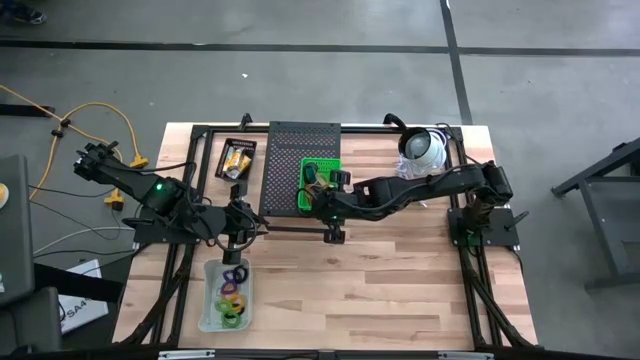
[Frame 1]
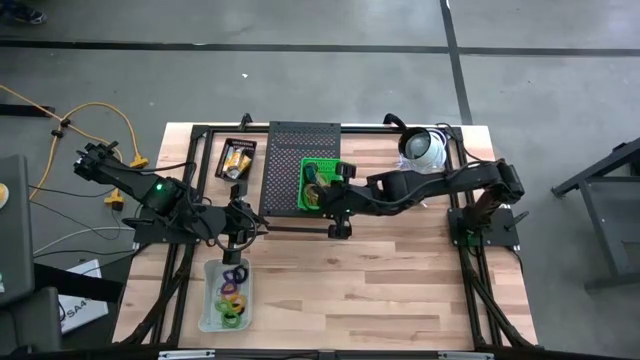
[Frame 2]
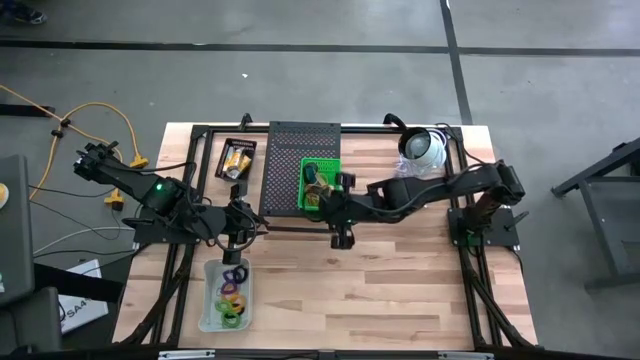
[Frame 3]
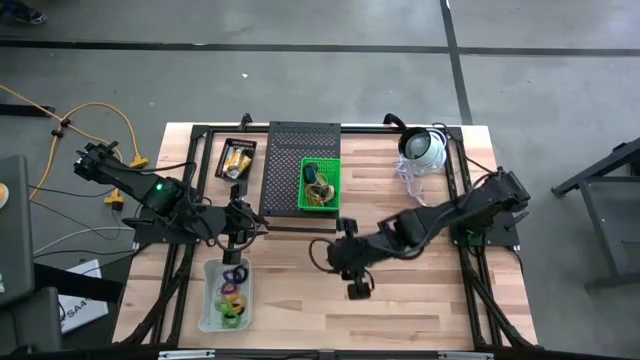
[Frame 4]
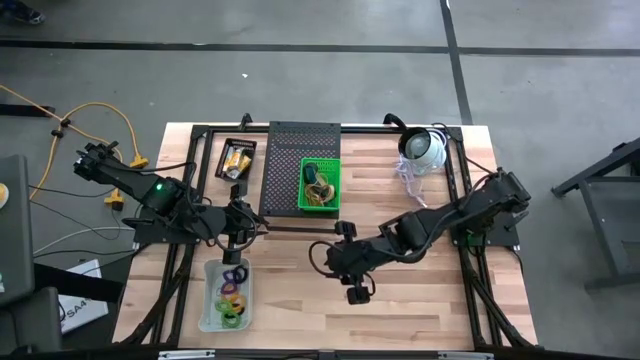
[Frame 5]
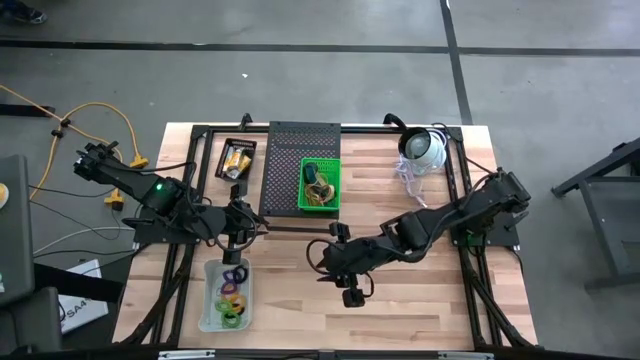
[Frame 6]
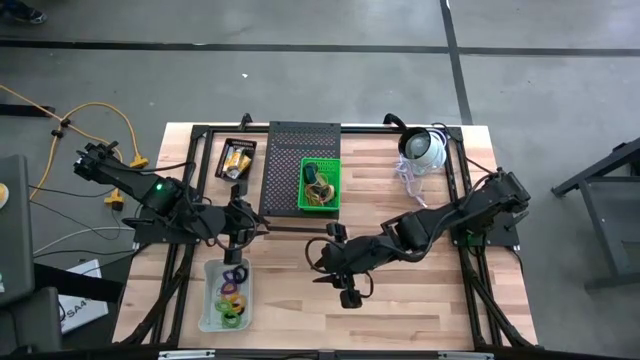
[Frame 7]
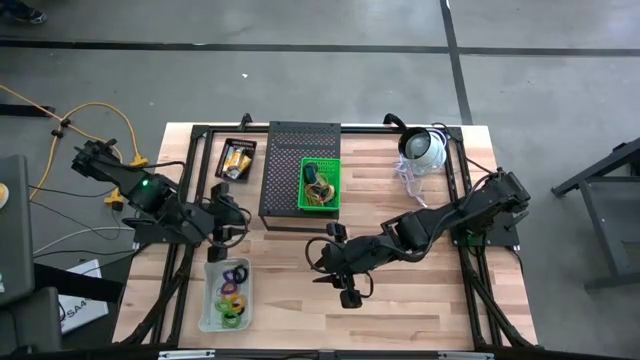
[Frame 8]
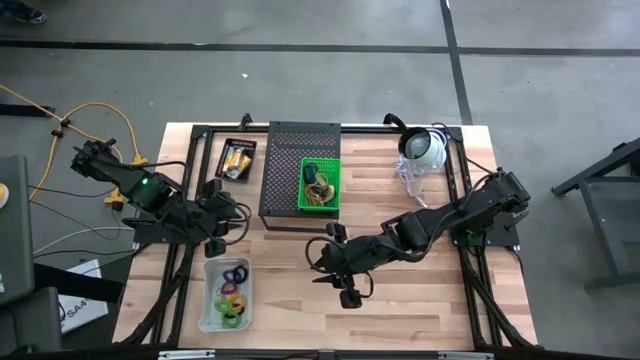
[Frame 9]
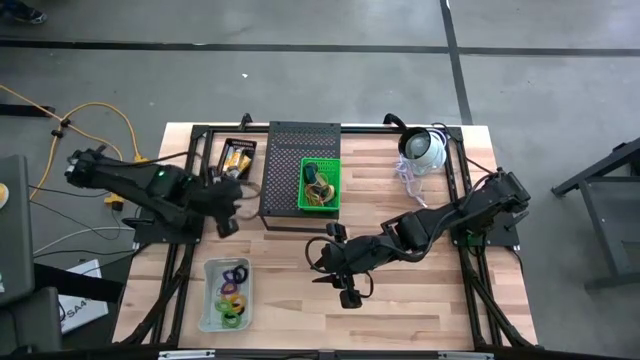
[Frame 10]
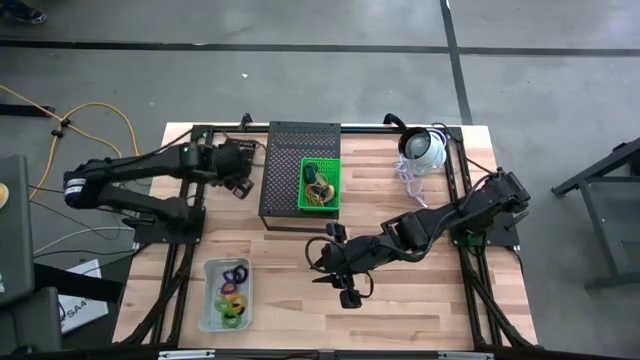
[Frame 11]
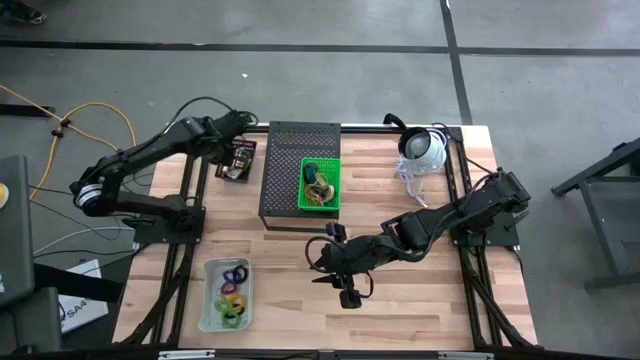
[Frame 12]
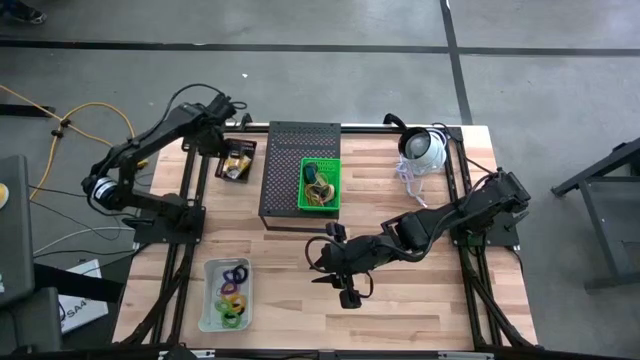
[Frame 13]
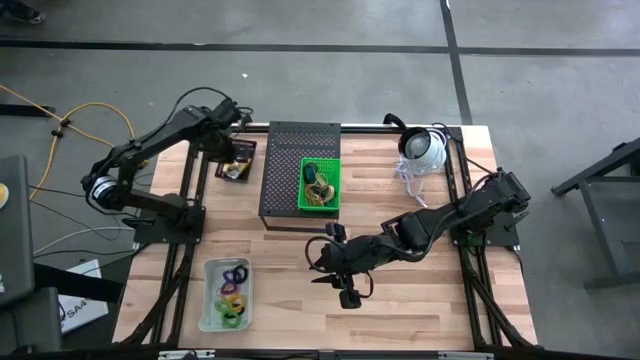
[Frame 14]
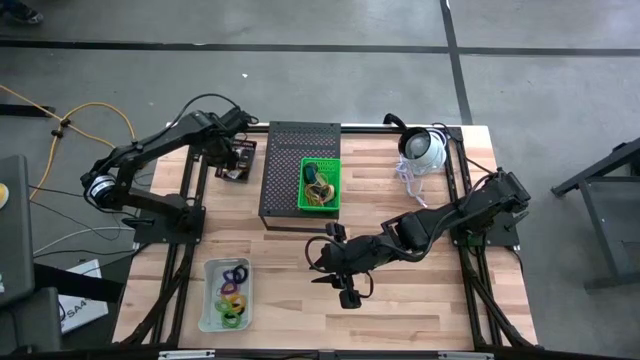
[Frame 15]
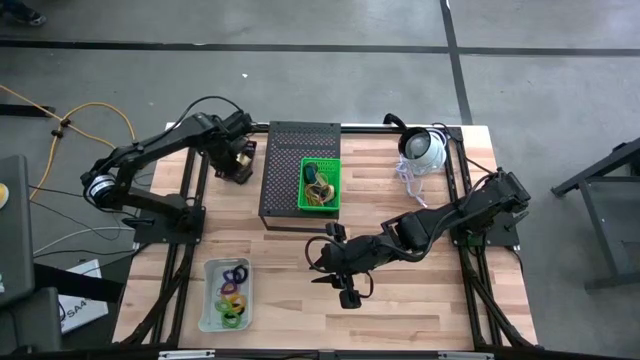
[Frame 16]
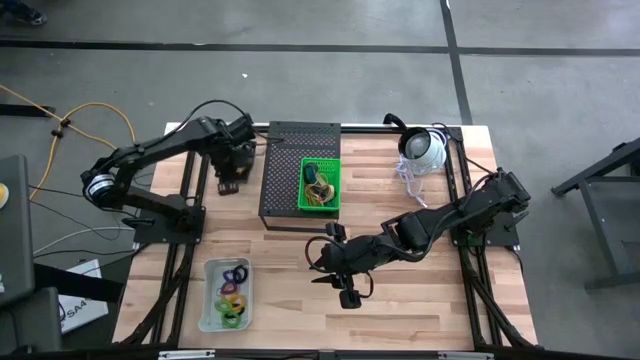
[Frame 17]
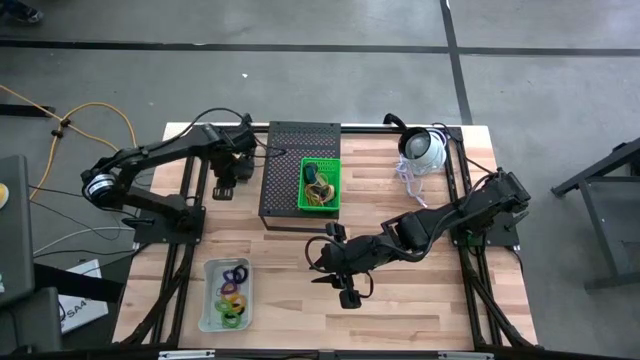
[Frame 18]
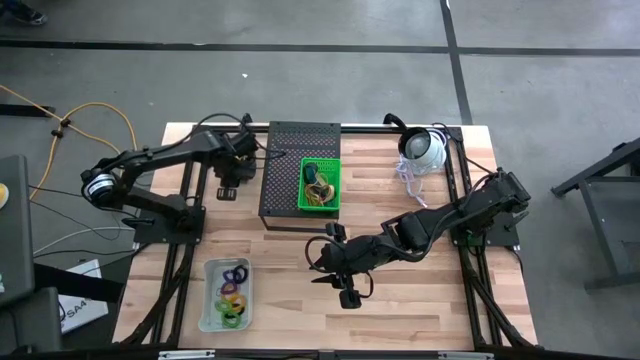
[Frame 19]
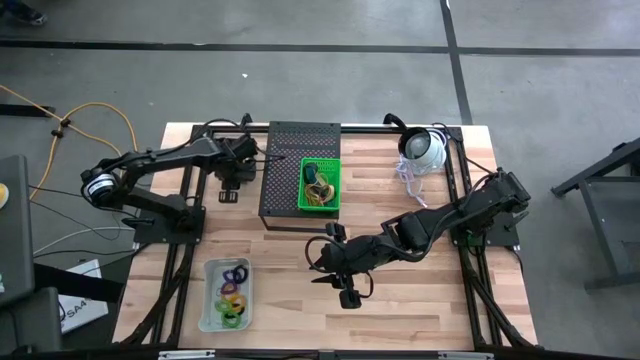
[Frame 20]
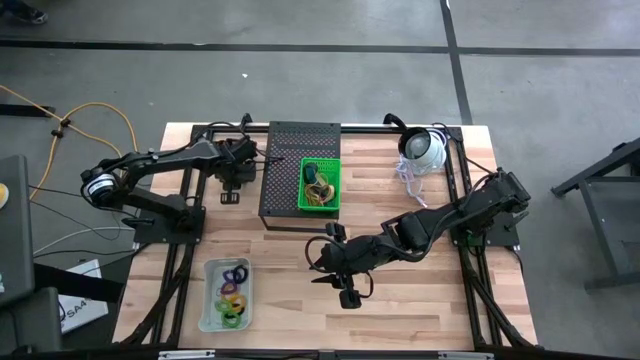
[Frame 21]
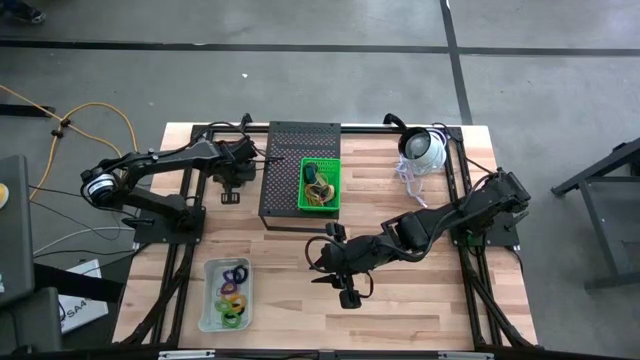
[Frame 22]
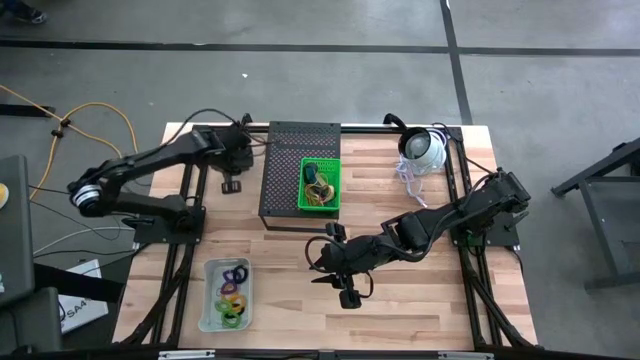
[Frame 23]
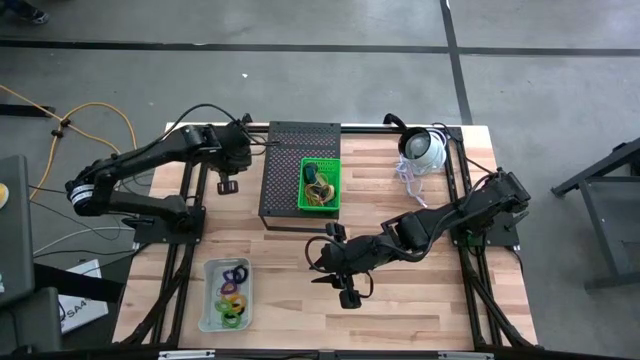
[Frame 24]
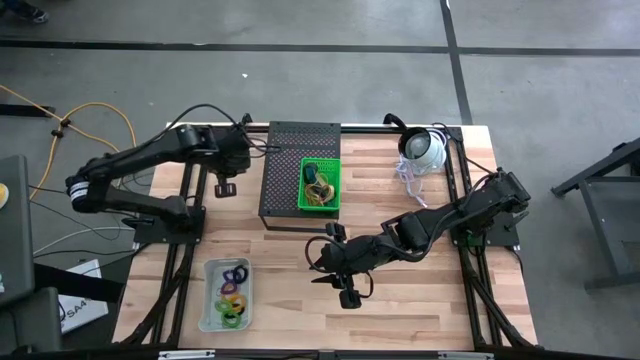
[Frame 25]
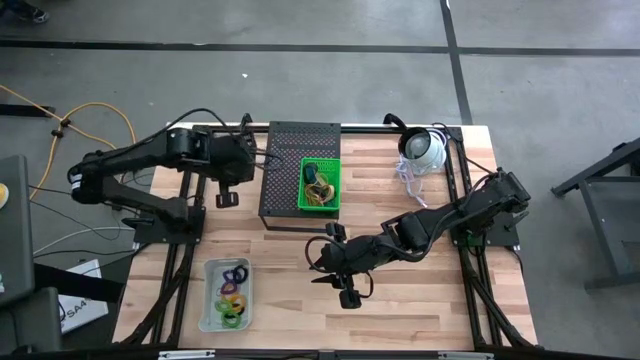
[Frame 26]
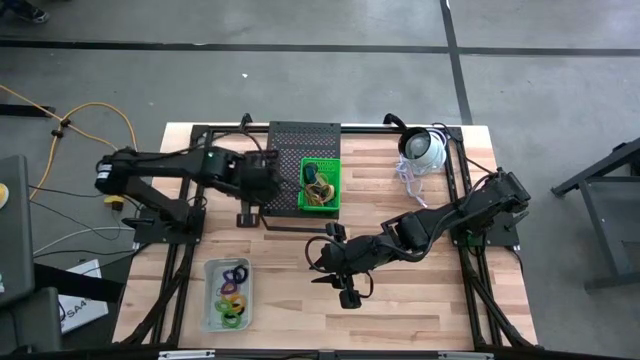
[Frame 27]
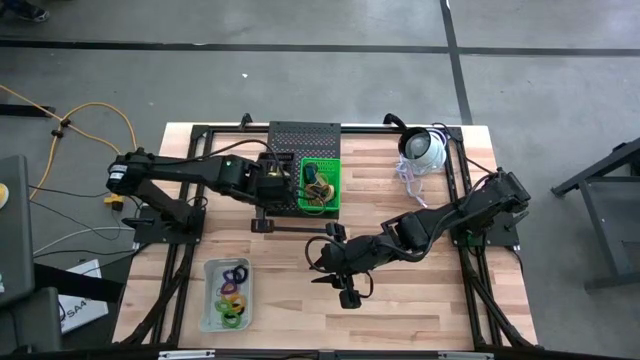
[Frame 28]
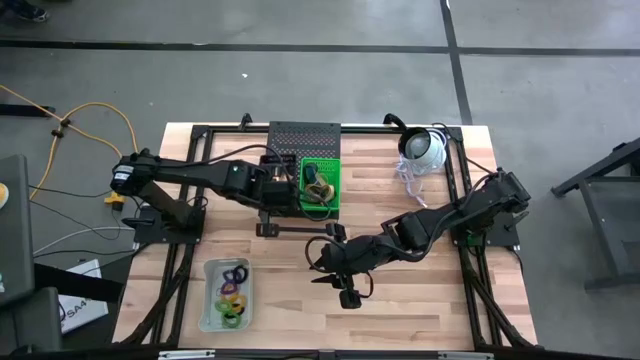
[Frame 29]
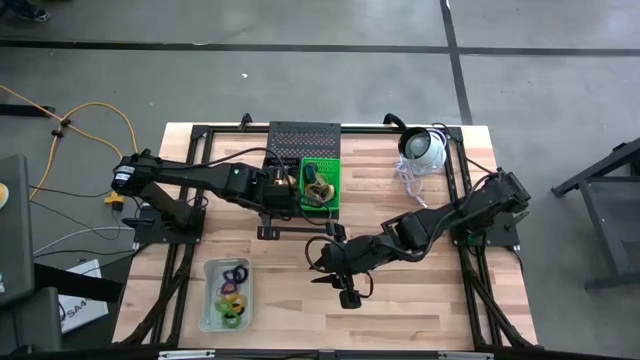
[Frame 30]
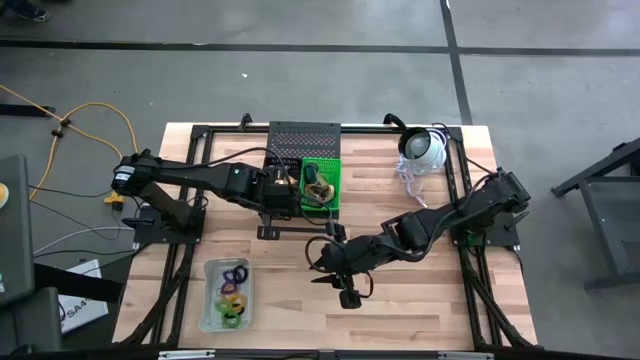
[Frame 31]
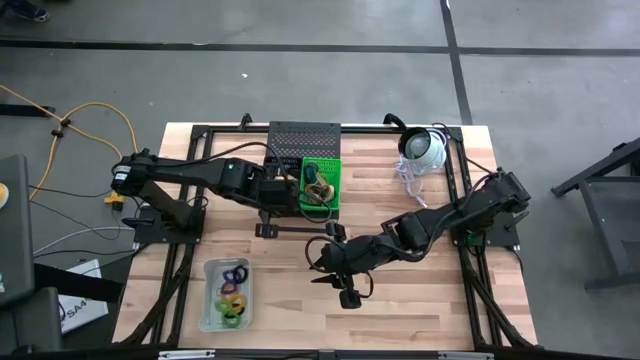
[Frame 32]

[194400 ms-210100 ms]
Task: Pick & Place Office Desk Supplies
Put the black bin with crayon boxes on the shelf

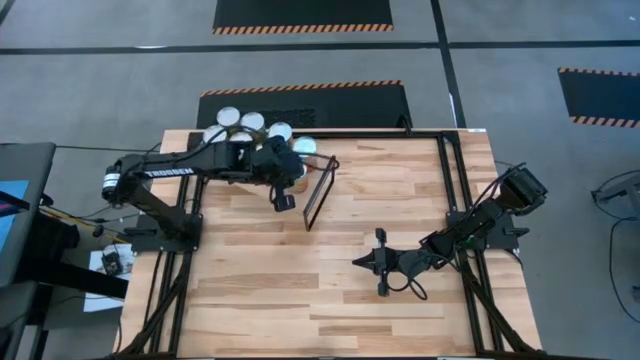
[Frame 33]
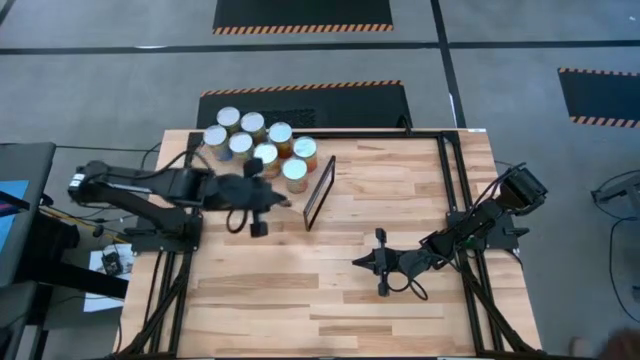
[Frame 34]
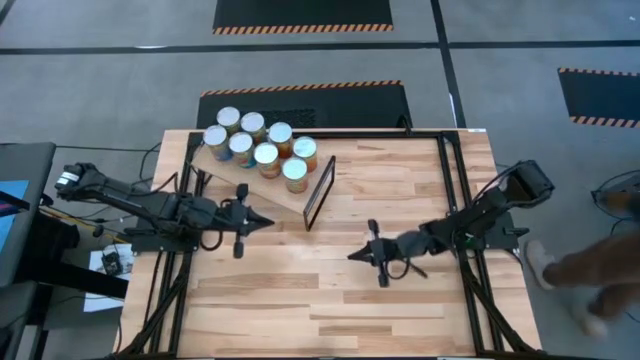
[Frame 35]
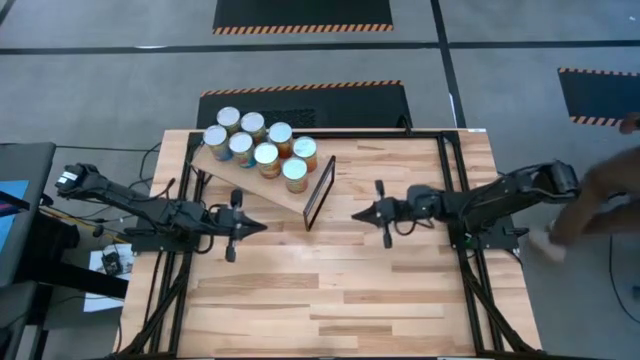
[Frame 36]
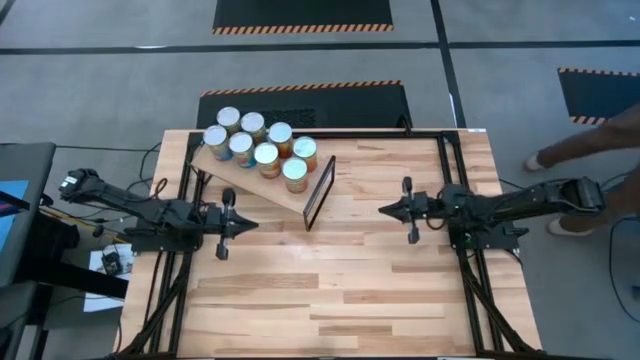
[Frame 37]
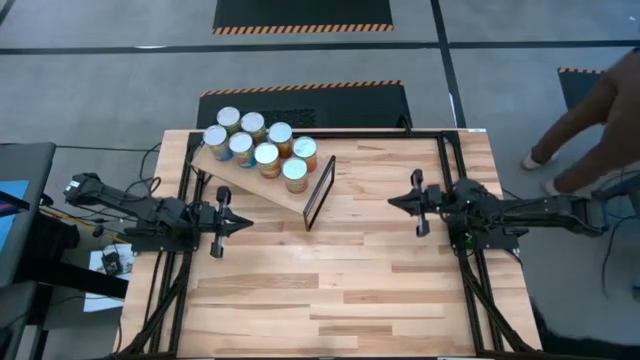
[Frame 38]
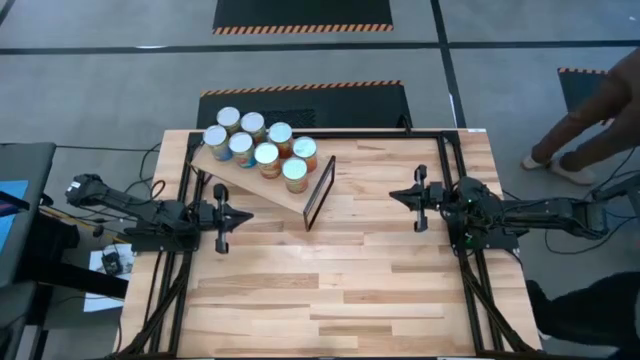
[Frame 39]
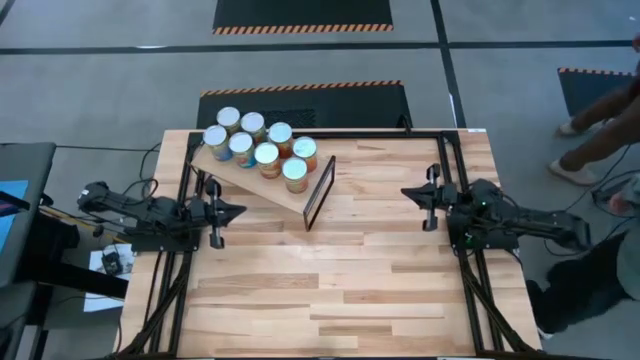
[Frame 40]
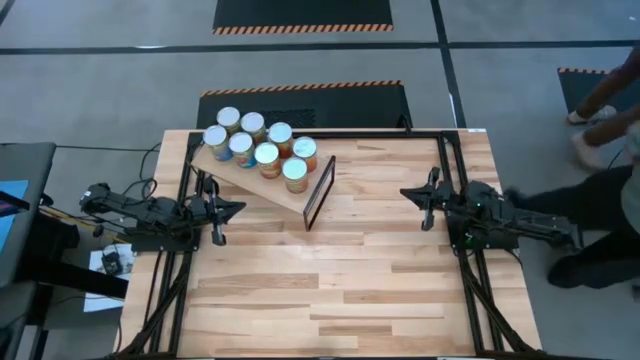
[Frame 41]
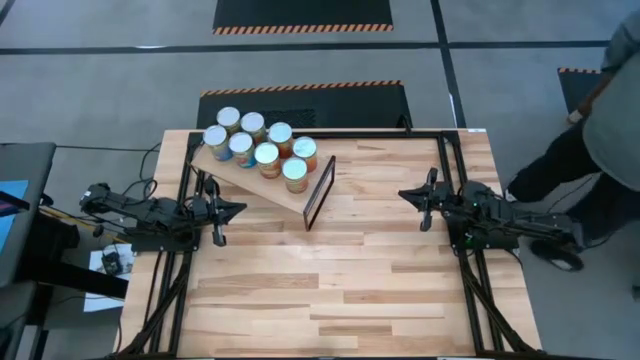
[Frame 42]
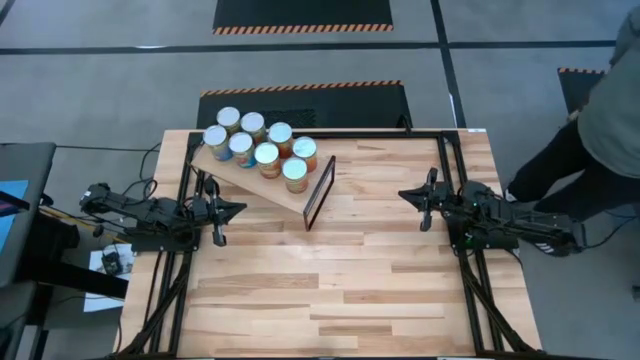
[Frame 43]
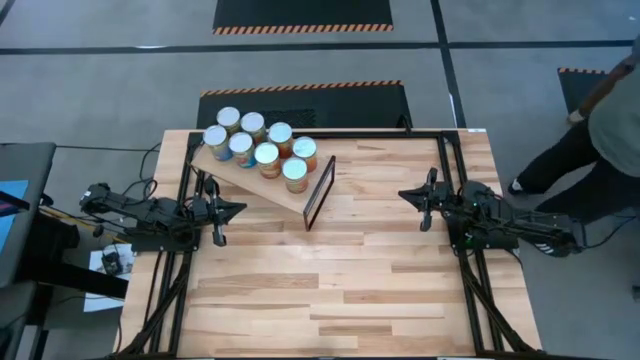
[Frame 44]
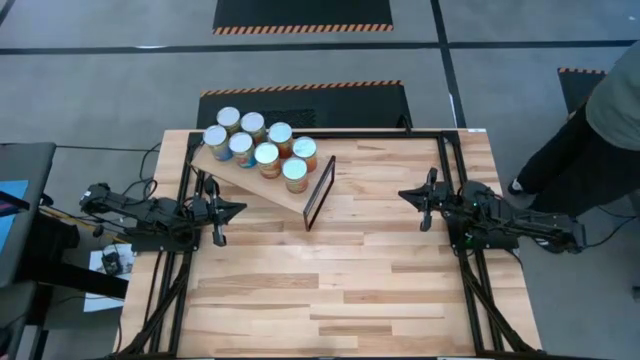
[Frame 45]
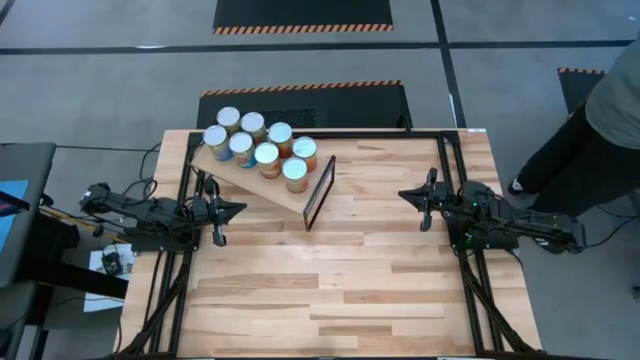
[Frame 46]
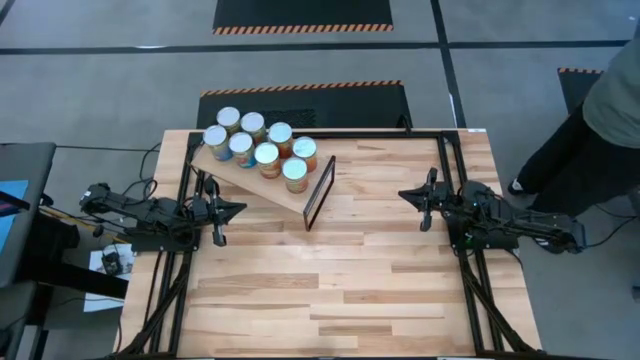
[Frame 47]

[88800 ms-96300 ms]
Task: Pick and place cans onto a shelf
Return to Home Position
